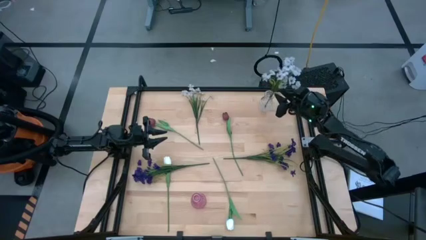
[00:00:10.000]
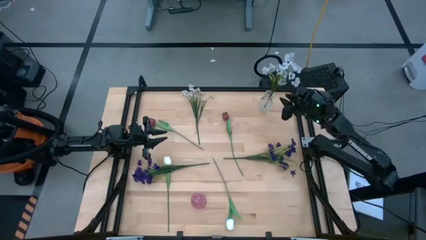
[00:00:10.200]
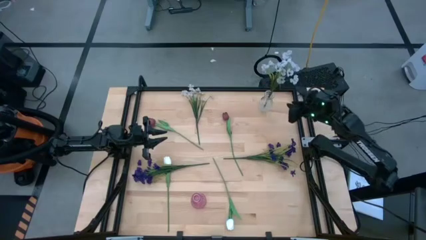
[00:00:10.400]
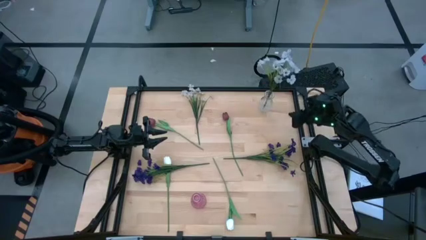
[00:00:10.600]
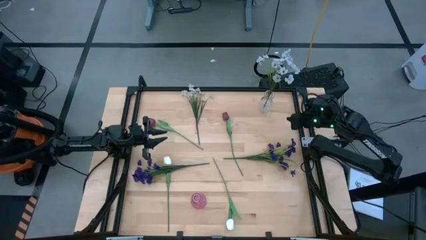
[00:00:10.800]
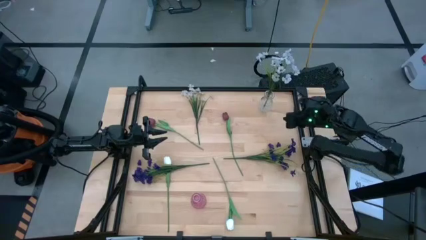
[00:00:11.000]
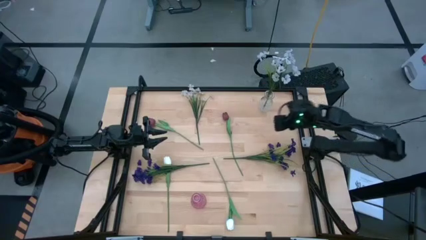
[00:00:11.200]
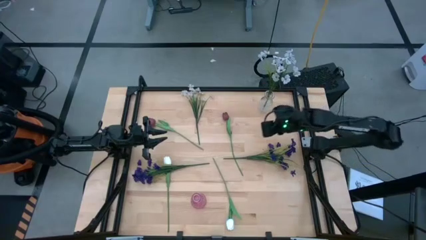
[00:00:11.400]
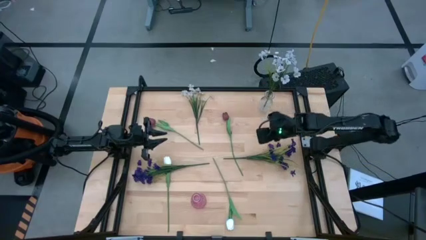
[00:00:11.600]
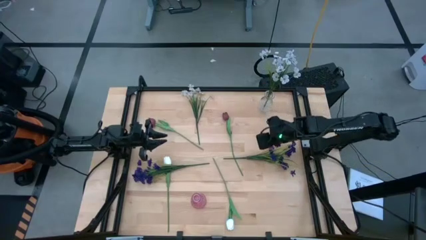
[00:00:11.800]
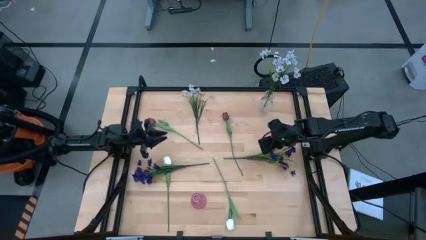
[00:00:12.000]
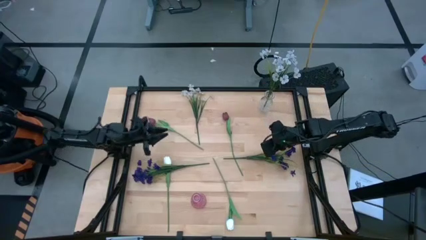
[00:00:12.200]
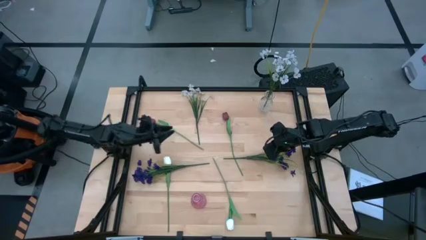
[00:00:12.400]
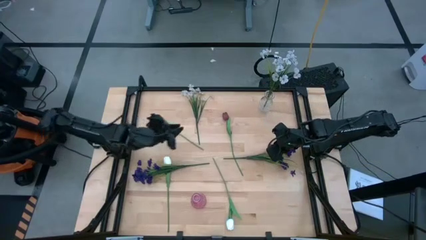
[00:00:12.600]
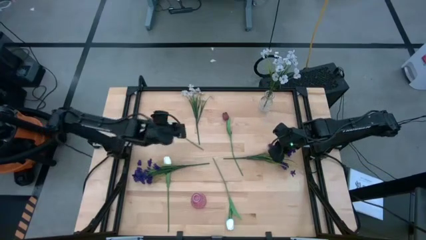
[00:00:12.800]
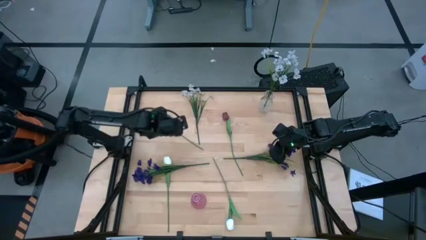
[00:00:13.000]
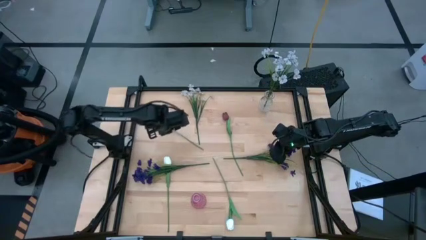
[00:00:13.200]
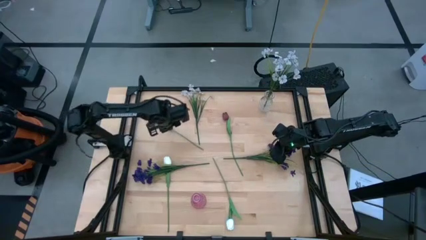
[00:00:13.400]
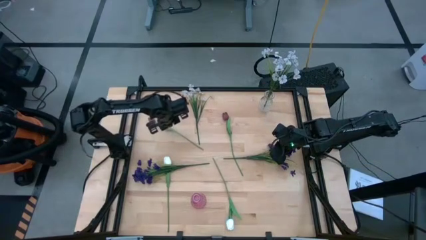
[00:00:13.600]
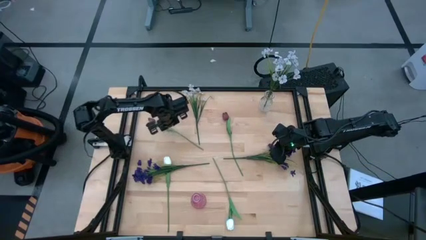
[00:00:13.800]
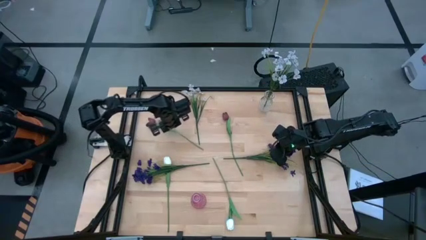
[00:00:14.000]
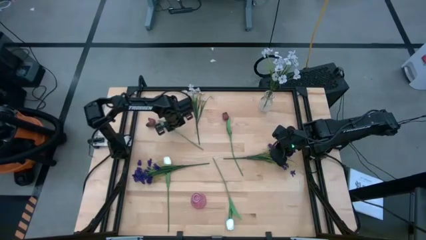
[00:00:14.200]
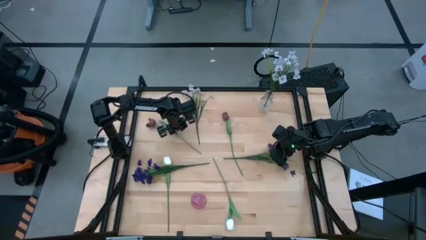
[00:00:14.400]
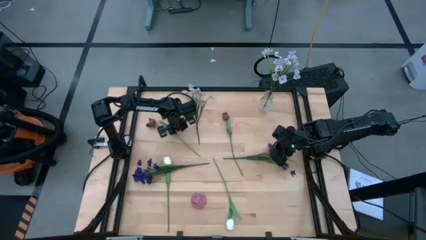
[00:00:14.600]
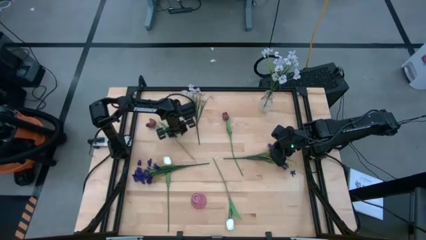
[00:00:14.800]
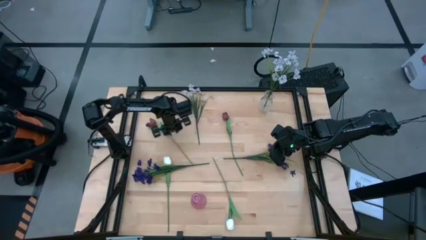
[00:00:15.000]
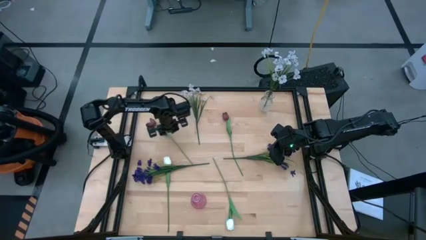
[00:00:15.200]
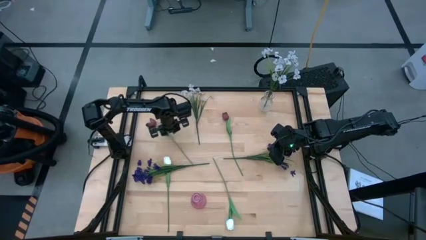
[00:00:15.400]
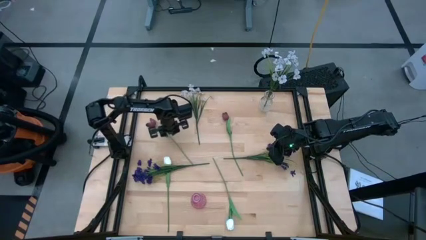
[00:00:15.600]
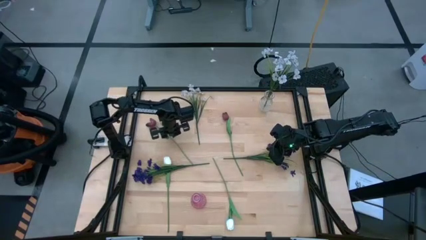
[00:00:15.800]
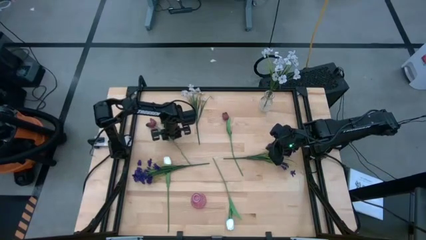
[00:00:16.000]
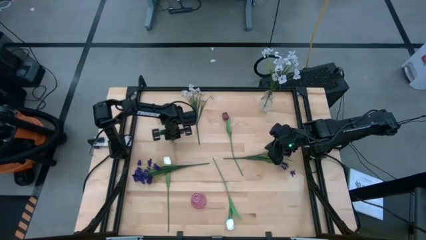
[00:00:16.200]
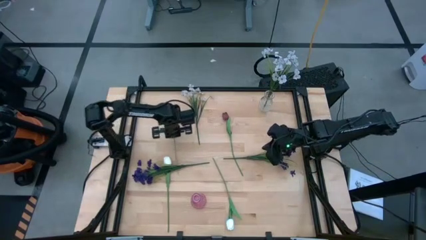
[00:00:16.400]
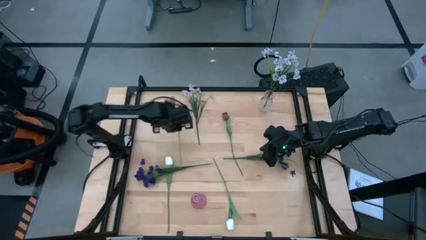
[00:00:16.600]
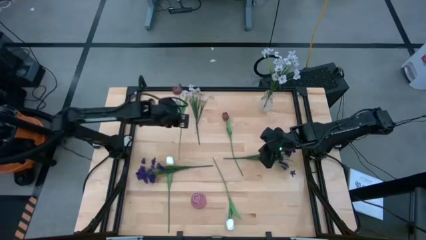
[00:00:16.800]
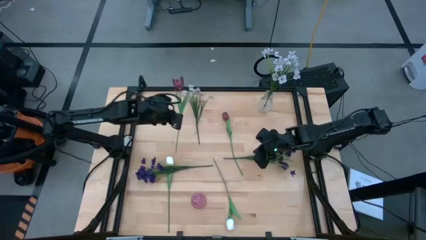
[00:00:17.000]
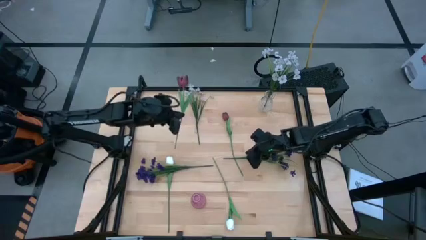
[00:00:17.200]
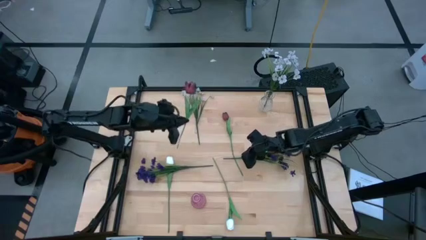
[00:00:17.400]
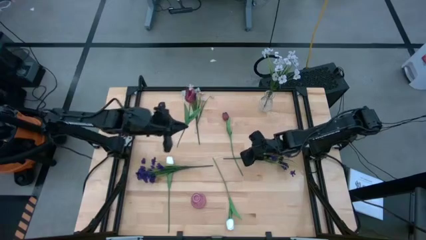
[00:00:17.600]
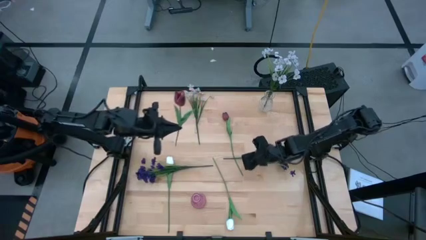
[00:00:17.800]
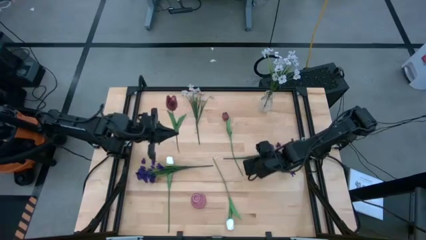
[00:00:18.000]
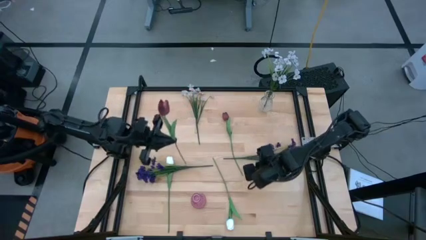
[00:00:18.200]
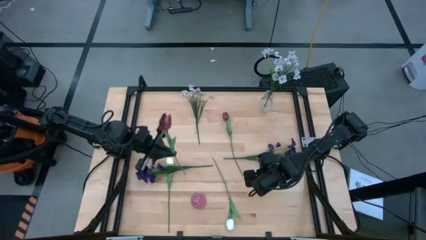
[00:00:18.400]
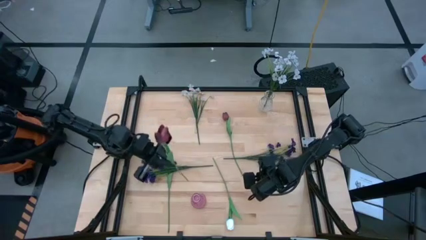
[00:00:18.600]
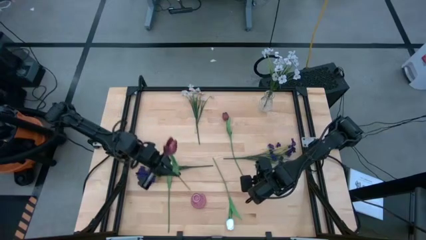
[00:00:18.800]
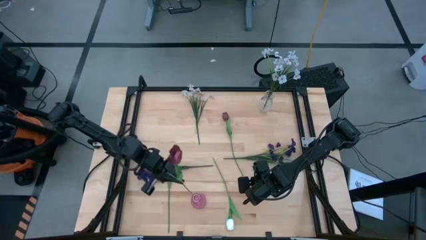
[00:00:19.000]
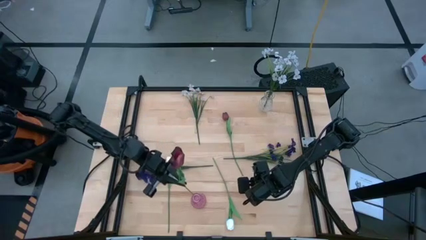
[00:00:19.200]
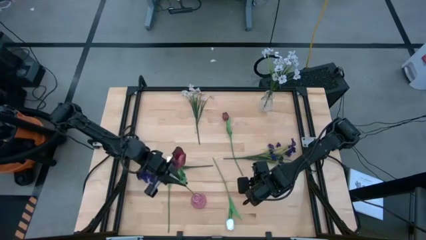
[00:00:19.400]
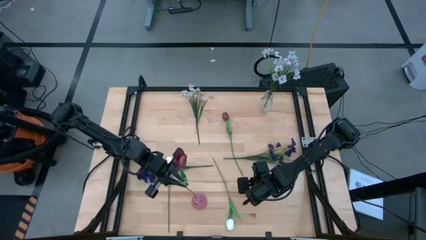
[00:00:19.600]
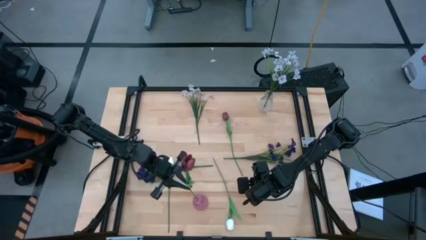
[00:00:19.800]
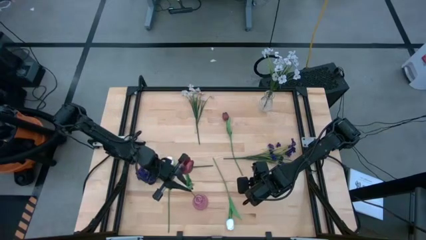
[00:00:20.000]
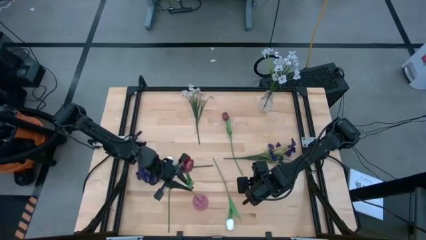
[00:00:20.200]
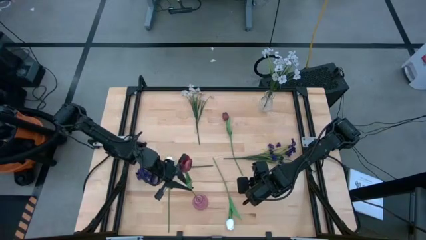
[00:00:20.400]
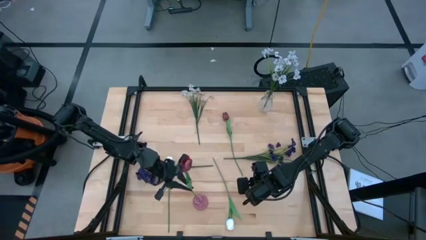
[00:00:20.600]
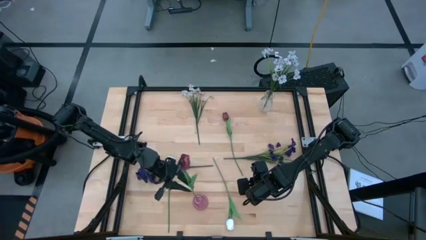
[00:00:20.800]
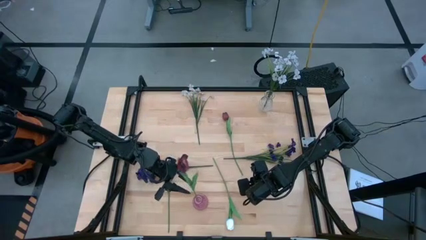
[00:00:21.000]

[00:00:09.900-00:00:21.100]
Task: Sort flowers into vase by color
Put the pink flower into the pink vase
